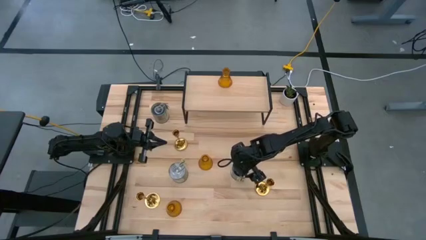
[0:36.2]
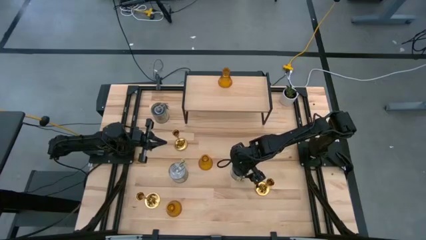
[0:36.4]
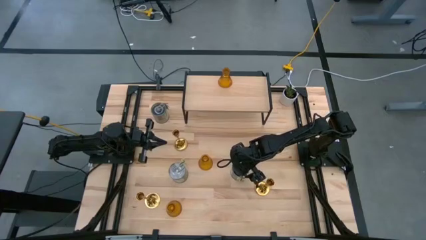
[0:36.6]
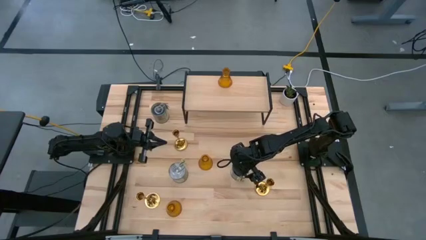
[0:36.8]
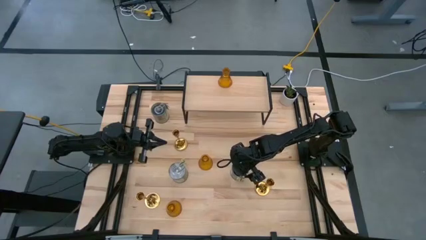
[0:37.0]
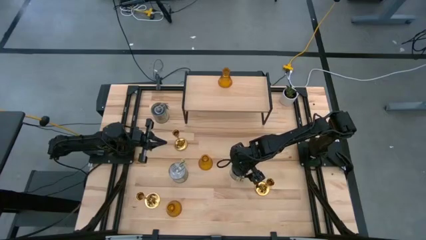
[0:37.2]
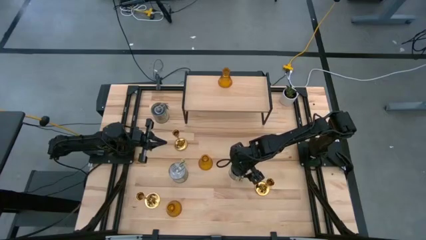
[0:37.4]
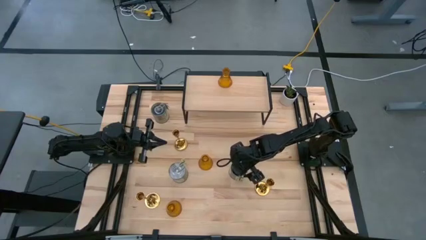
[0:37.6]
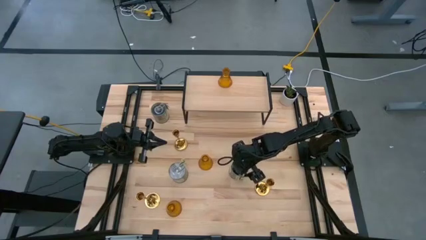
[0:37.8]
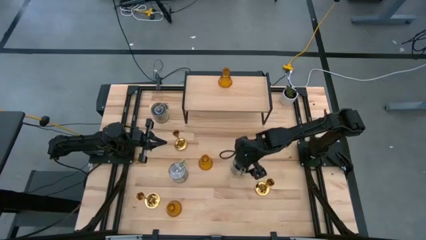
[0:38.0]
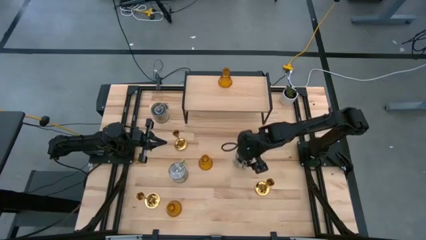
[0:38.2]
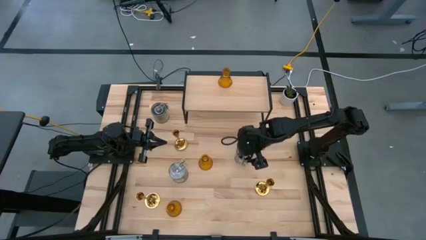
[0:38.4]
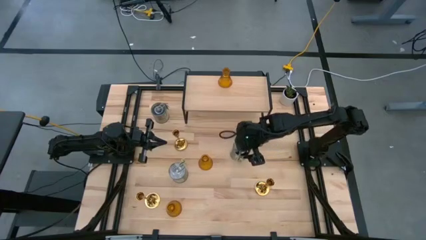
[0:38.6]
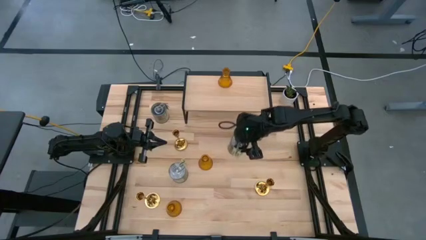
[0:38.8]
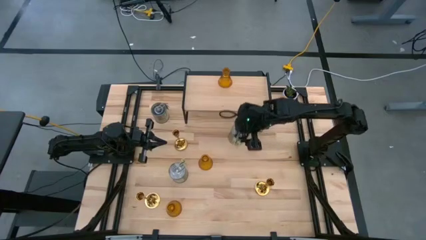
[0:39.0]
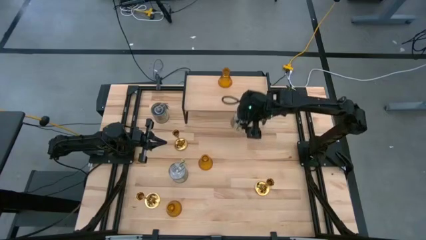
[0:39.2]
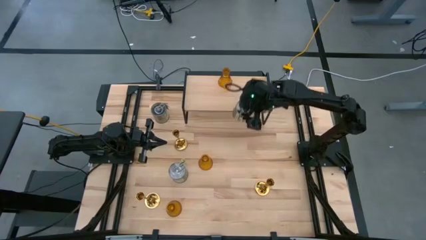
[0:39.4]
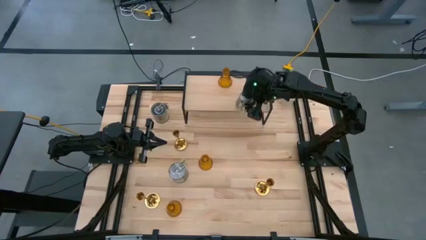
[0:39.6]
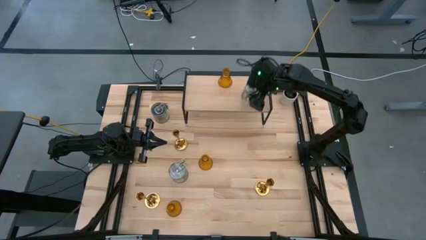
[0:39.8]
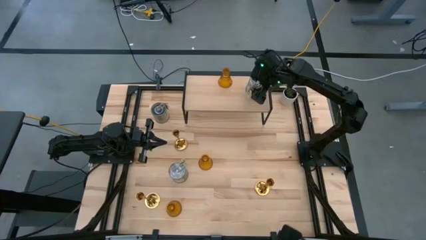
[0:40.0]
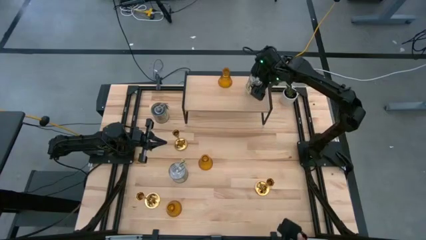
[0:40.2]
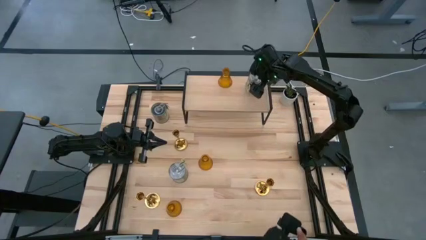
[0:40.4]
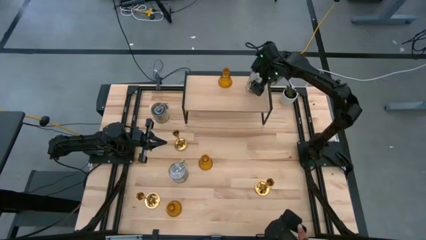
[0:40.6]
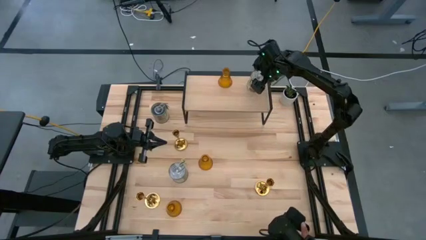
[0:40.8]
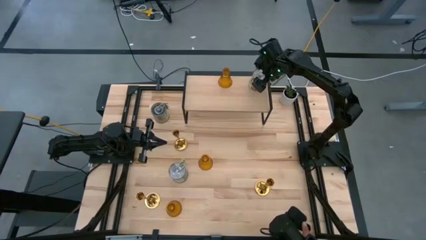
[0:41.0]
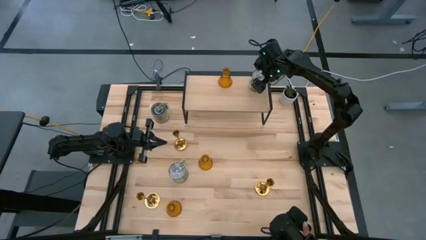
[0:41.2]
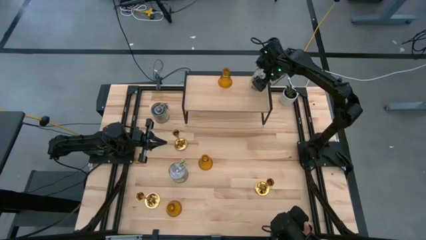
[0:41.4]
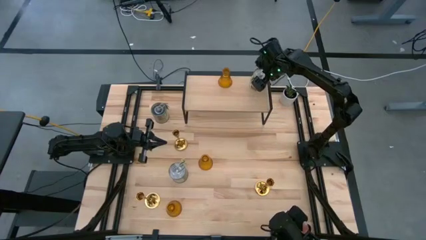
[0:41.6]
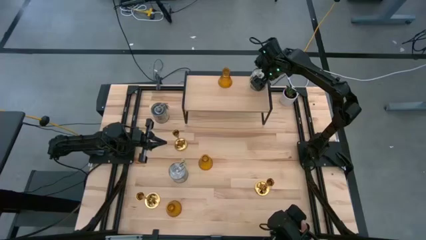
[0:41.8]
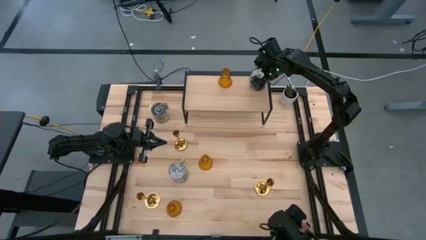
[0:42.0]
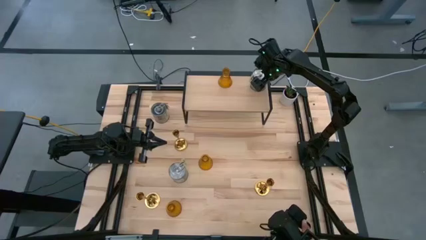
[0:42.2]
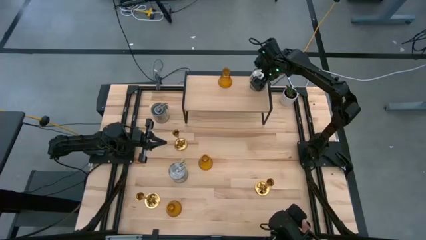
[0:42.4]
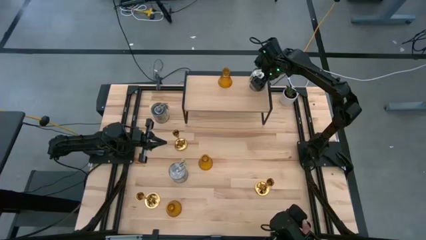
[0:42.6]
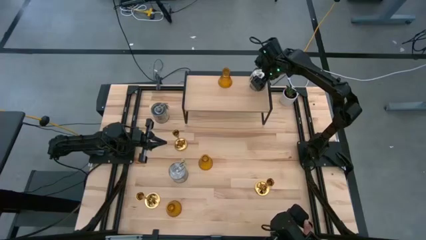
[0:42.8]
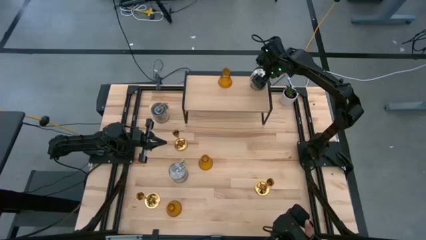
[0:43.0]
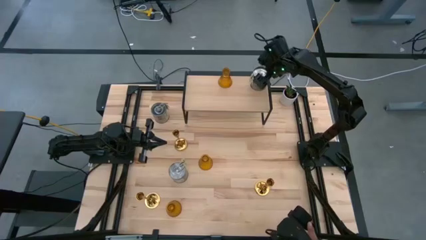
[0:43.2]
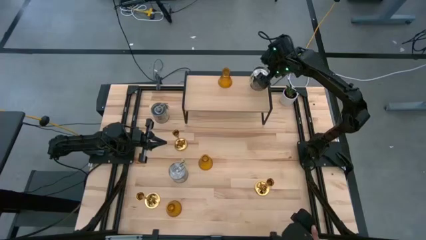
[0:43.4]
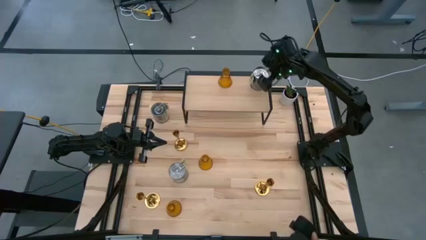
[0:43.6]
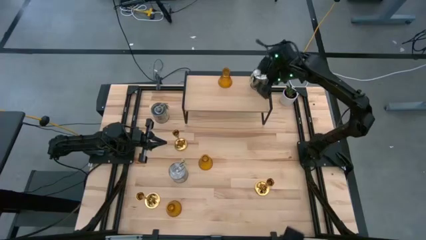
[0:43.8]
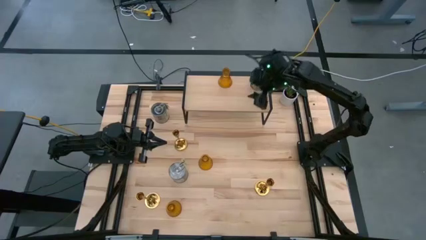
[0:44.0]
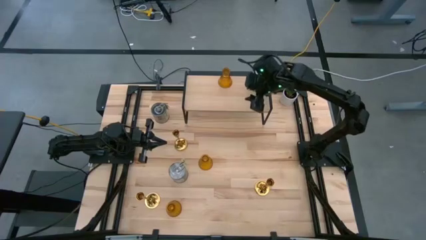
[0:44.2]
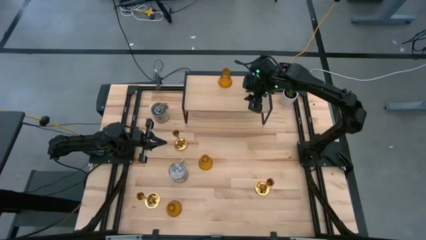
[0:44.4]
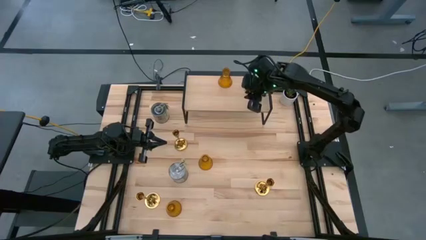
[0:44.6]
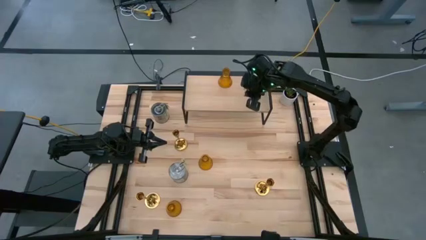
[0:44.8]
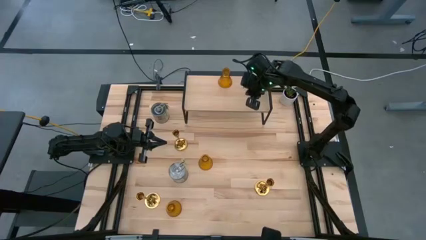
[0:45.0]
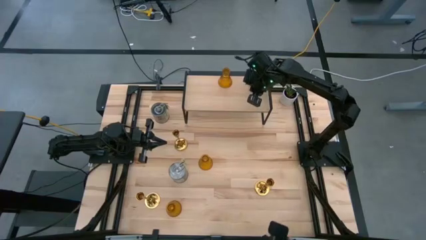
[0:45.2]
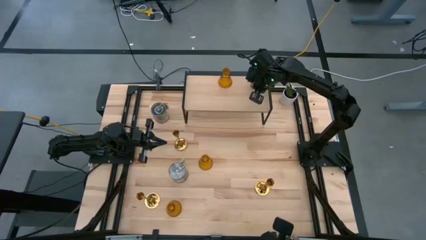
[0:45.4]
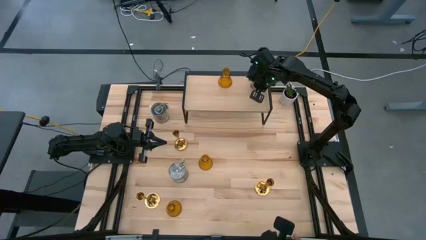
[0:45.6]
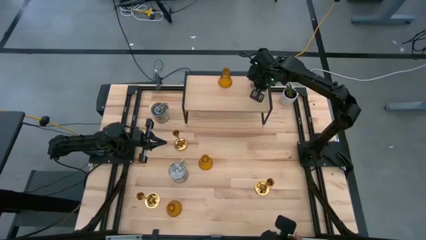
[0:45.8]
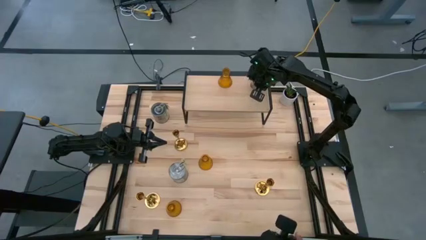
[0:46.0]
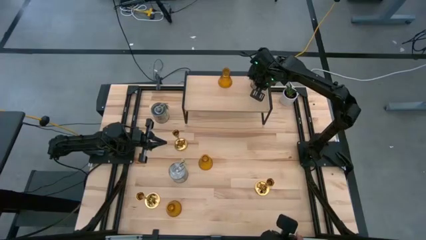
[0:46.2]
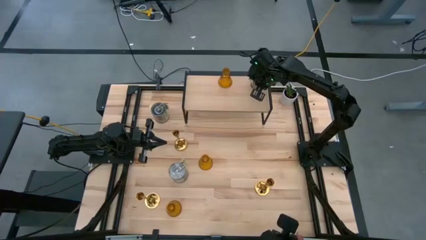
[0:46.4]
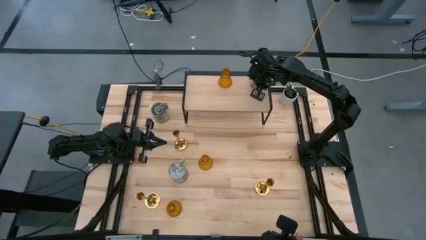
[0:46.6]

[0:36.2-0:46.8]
Task: Pick & Place candle stick holders
Put the bottom right scented candle on the shelf

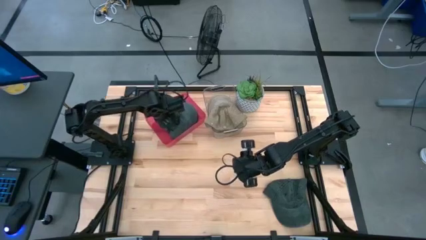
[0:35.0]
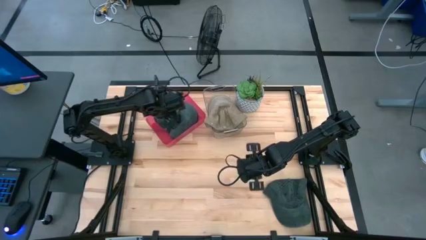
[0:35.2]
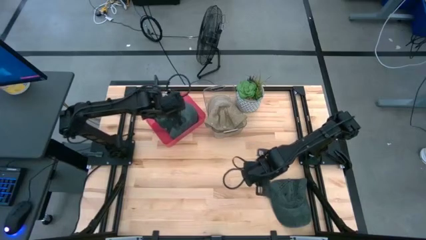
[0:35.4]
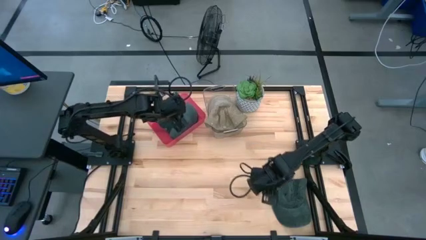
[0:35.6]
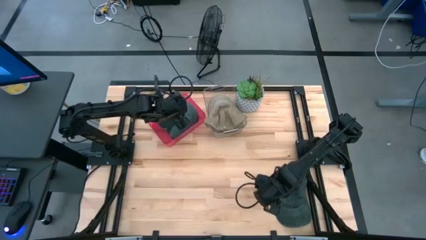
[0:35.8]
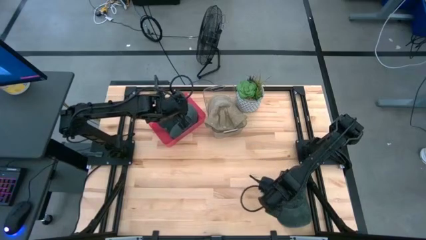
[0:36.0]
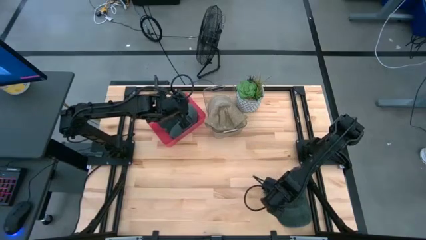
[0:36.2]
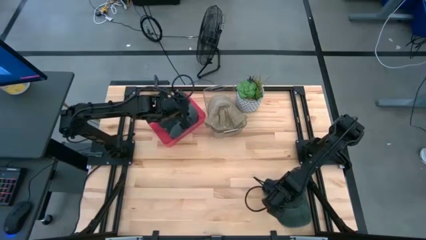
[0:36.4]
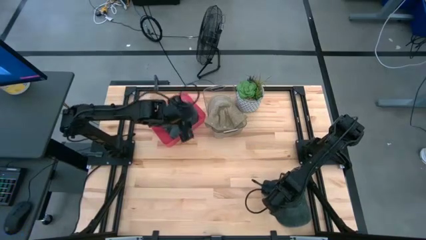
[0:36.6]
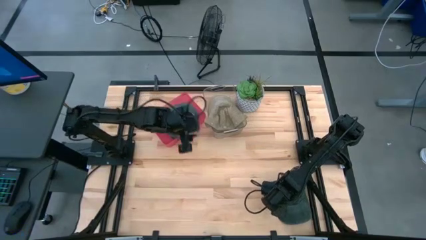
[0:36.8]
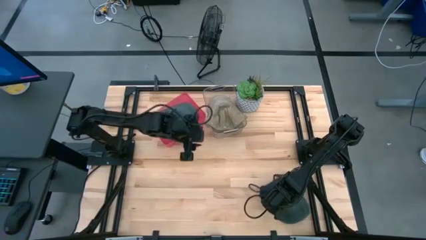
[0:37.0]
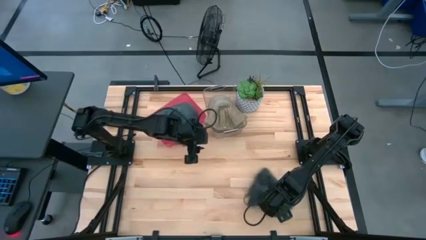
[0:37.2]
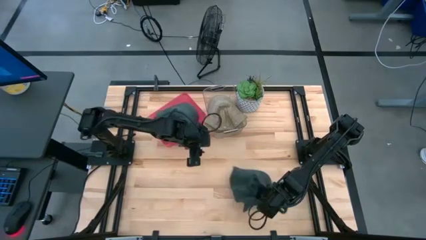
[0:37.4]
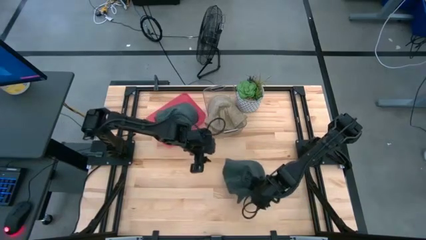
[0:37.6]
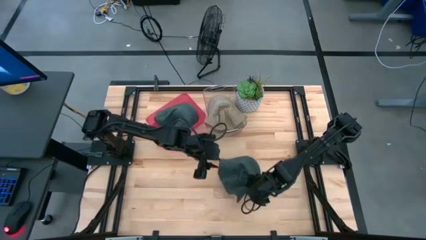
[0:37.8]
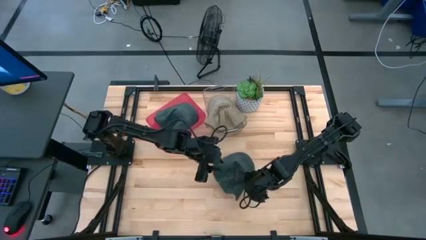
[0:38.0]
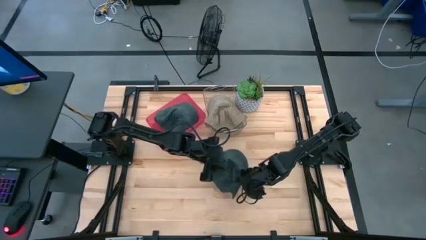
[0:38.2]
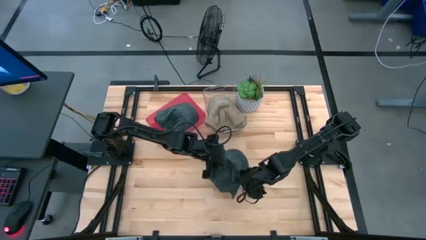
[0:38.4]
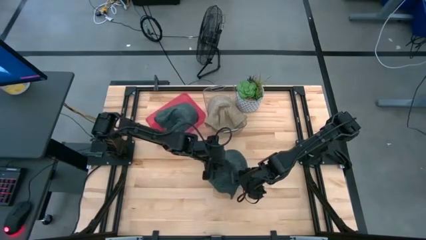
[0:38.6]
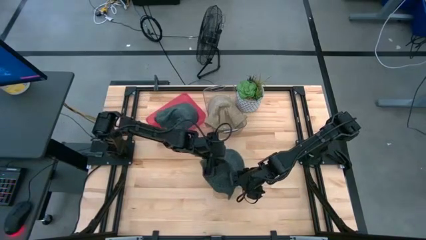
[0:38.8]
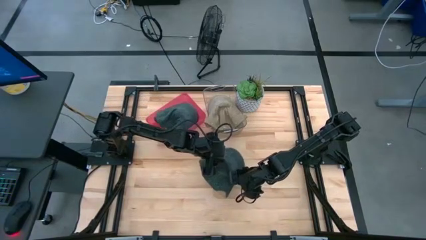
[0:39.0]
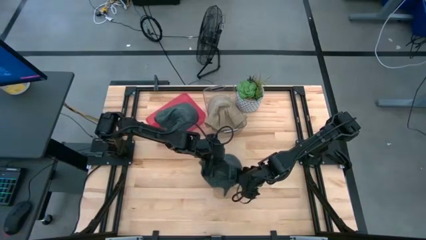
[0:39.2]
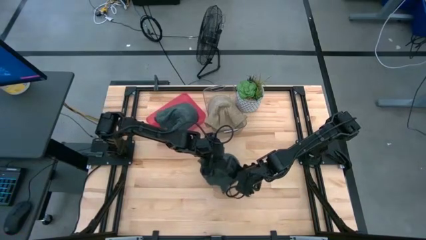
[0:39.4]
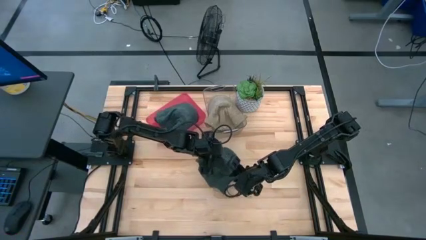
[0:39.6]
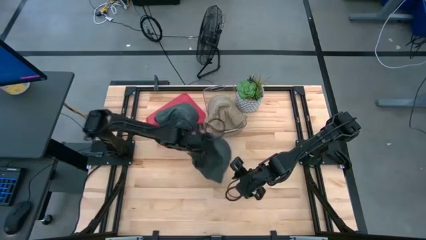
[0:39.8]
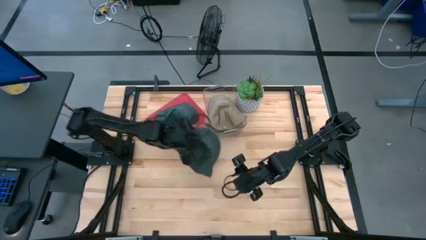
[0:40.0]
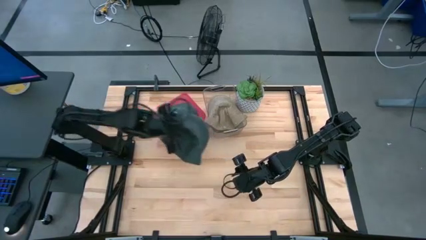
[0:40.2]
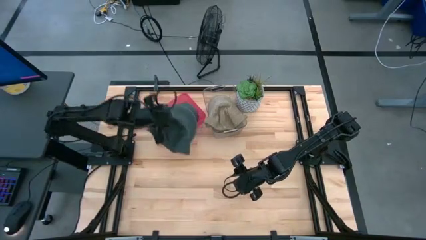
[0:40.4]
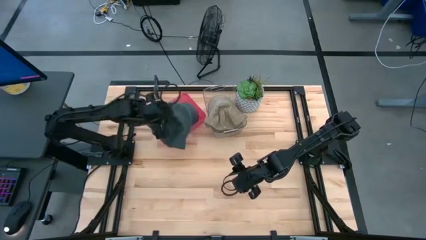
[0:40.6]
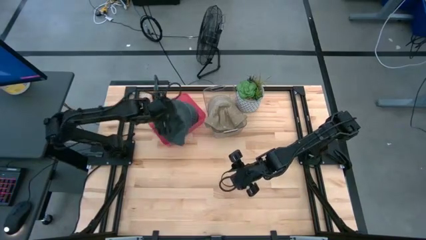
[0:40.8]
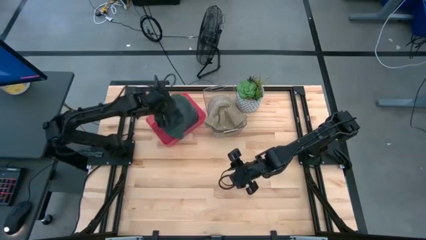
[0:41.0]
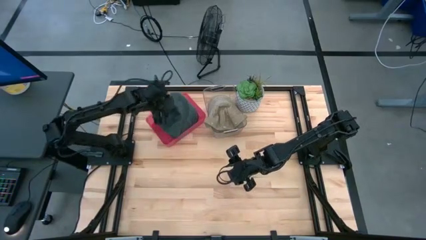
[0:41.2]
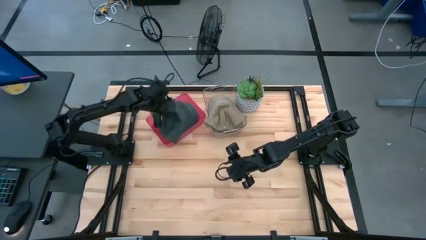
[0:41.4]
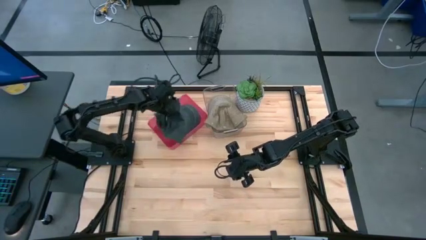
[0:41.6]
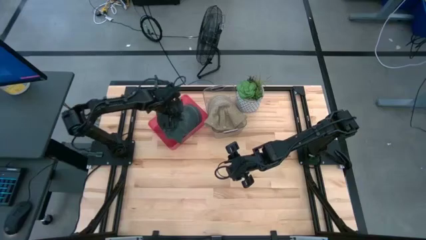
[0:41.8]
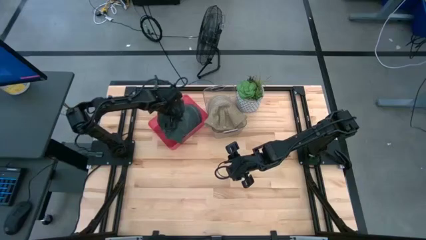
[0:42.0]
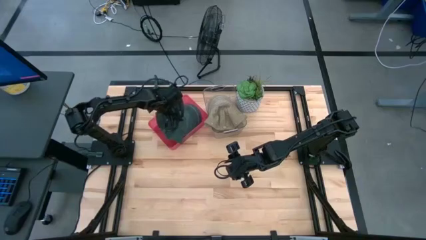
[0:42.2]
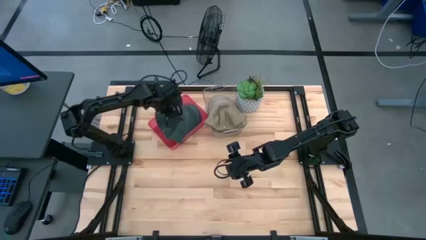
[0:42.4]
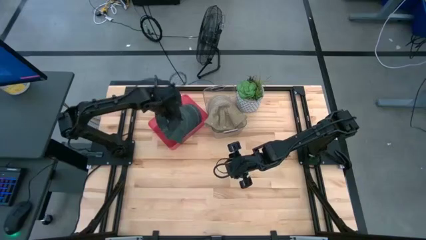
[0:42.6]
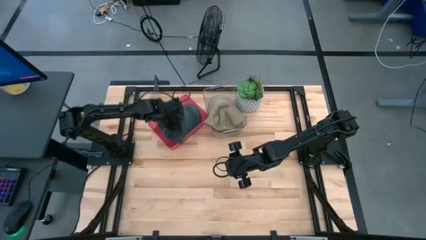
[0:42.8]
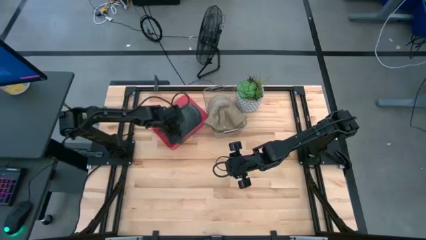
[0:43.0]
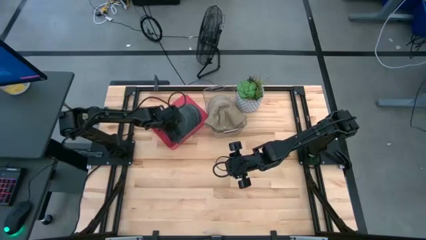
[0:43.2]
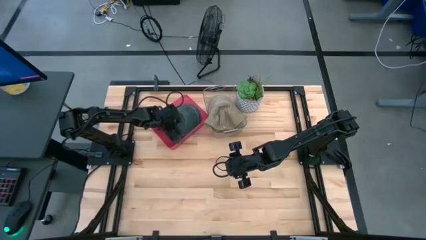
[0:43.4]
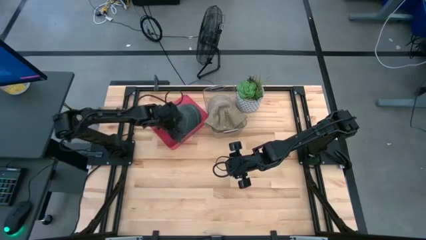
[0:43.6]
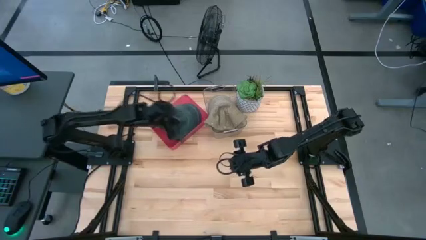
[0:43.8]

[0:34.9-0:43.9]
Task: Pick & Place hat
Put the black cap into the pink bin
